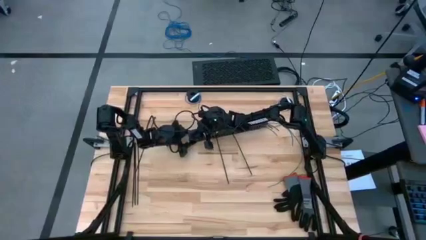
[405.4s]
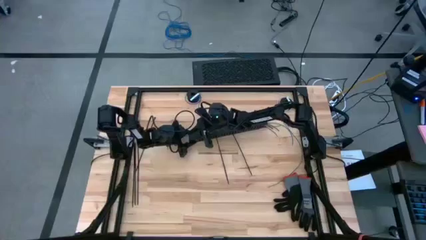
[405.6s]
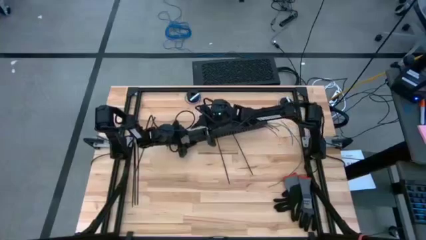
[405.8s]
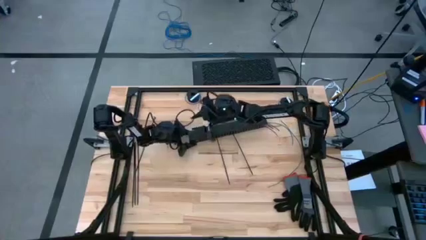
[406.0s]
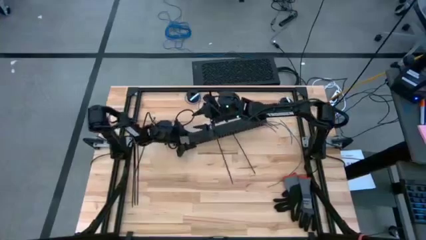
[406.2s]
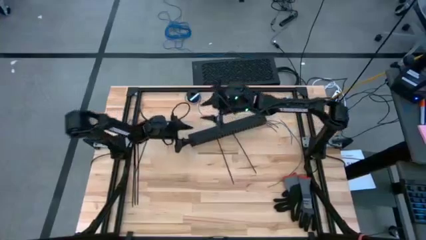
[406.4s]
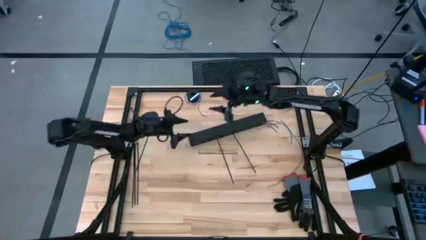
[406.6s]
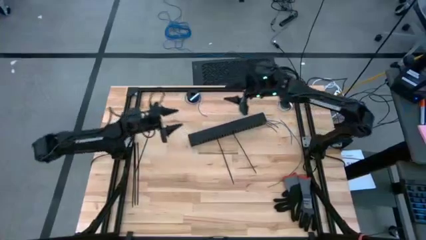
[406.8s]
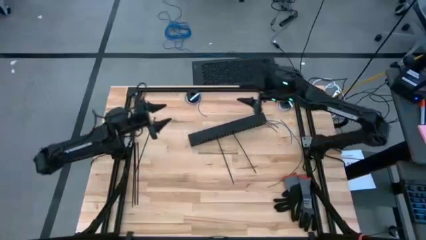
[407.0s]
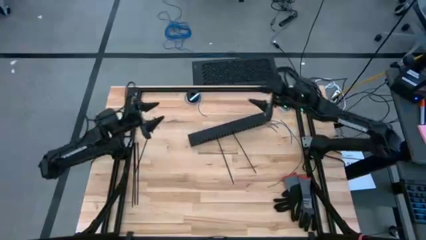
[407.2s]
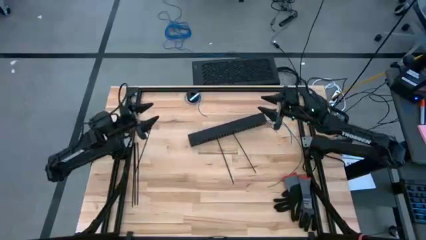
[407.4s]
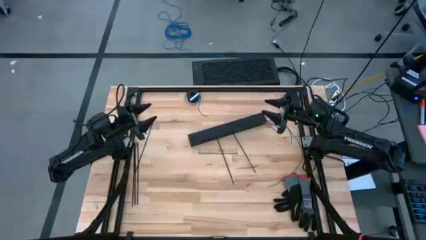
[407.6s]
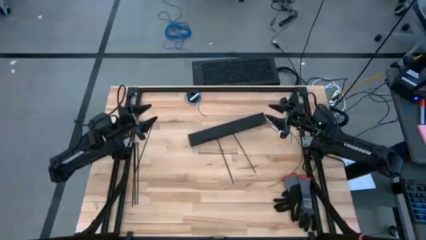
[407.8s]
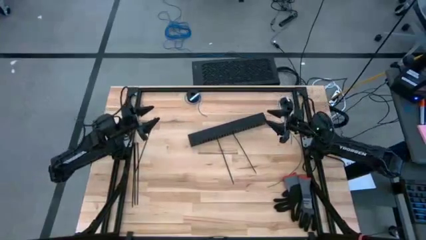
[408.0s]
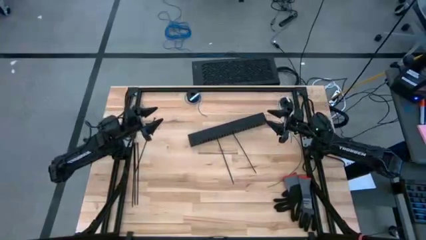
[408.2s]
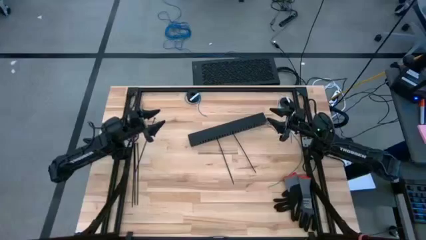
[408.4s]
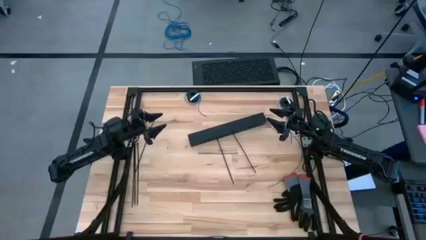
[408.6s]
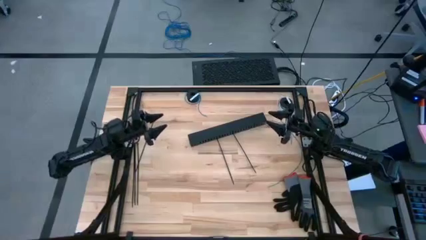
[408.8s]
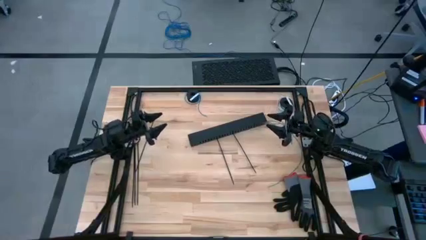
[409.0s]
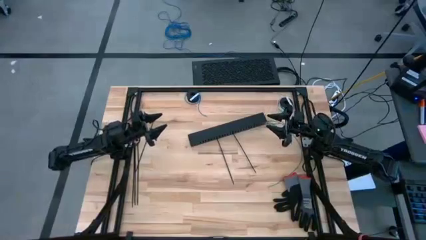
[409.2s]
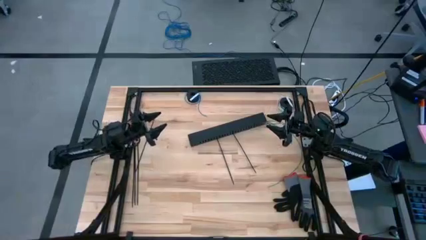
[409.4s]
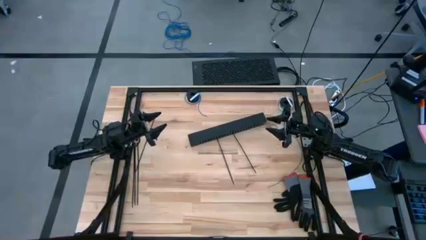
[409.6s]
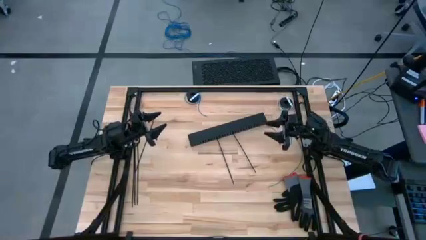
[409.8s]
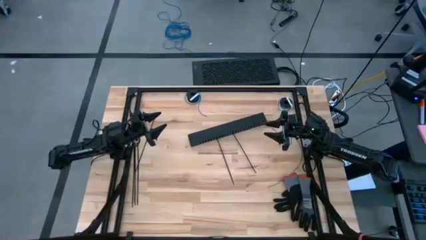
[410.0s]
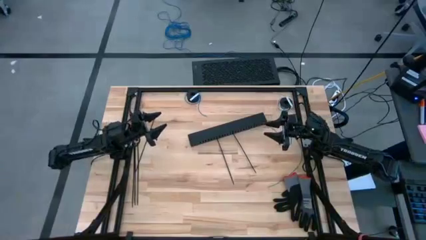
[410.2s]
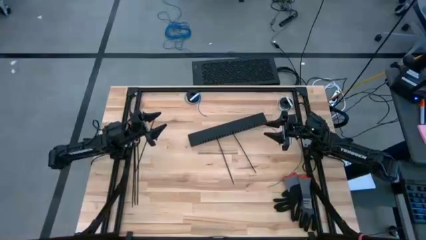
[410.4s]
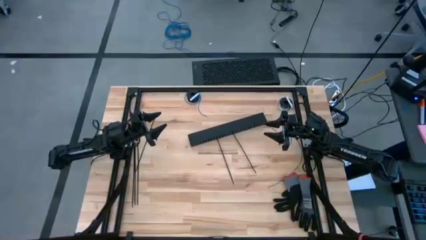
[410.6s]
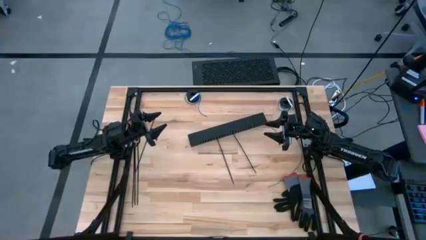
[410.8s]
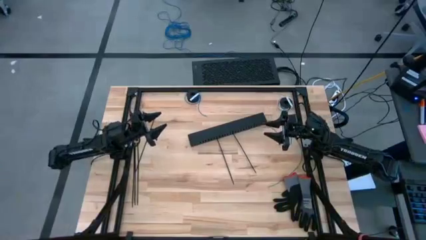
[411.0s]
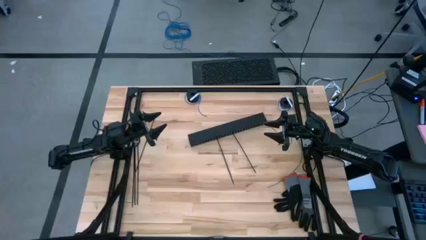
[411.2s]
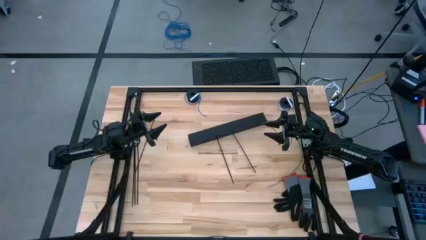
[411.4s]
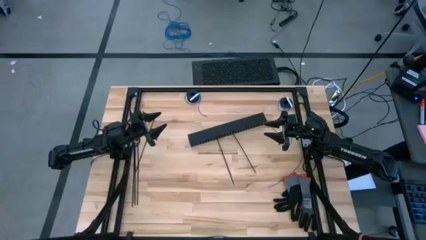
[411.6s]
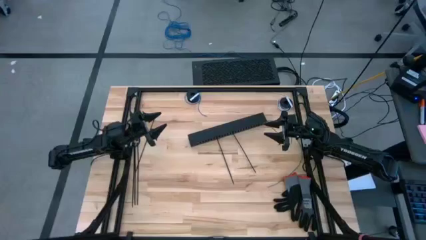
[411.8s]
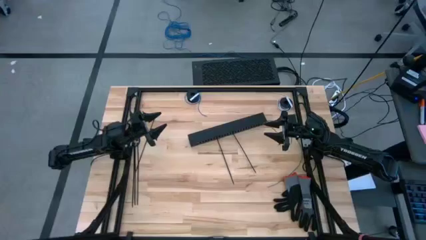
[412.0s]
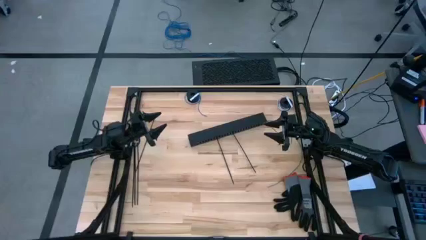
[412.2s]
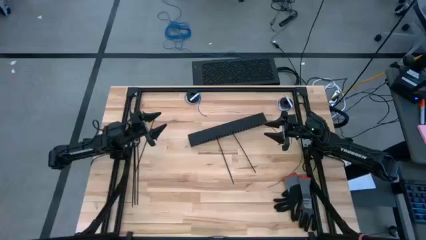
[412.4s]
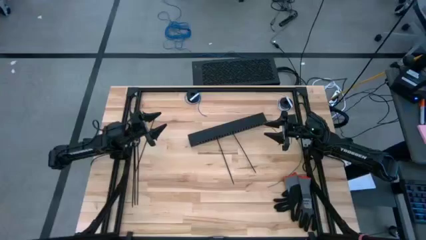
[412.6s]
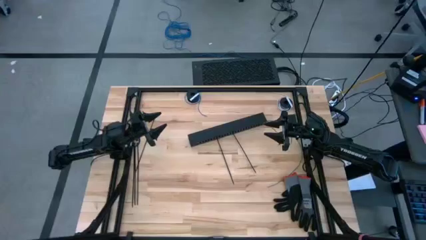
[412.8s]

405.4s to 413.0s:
Task: Ziptie cables
Return to Home Position

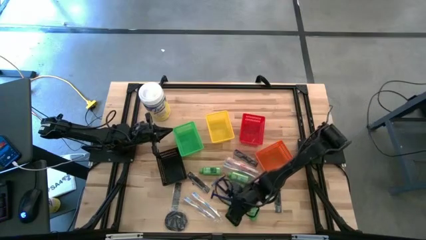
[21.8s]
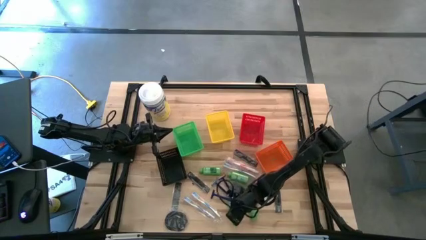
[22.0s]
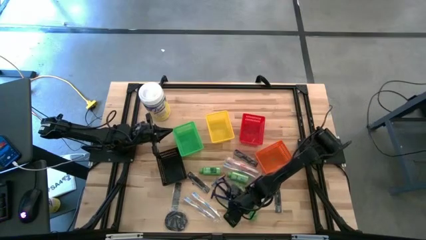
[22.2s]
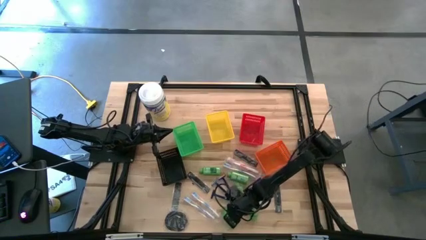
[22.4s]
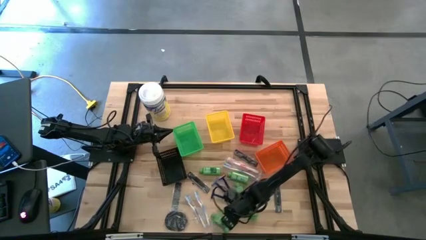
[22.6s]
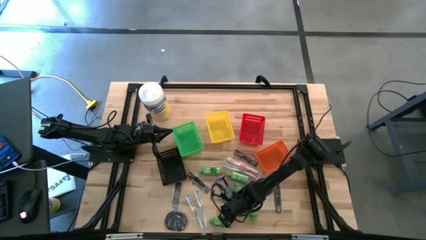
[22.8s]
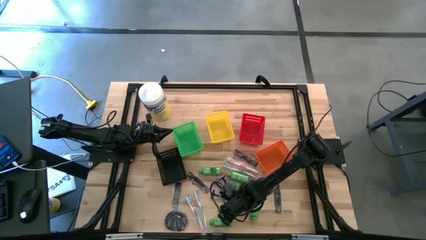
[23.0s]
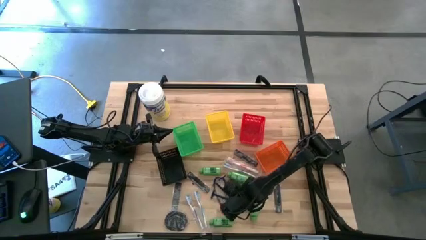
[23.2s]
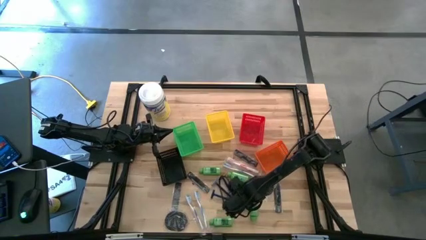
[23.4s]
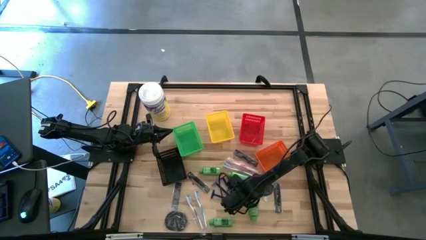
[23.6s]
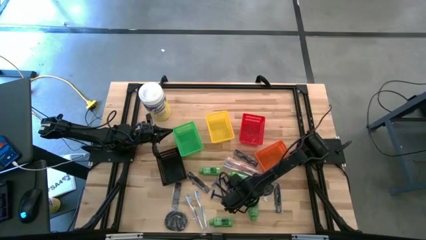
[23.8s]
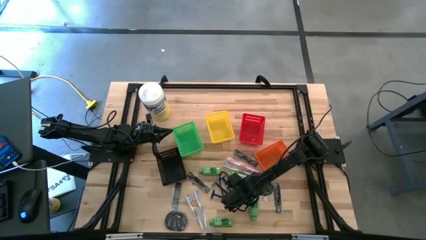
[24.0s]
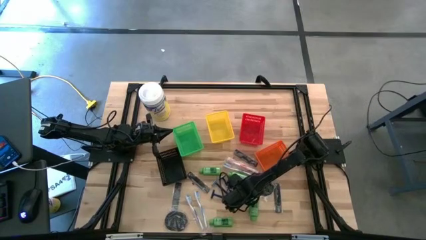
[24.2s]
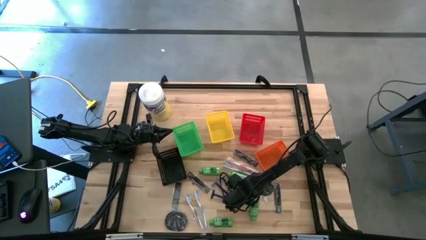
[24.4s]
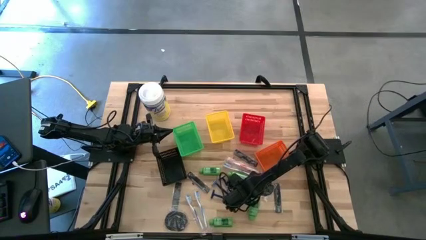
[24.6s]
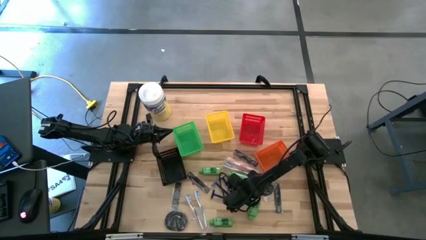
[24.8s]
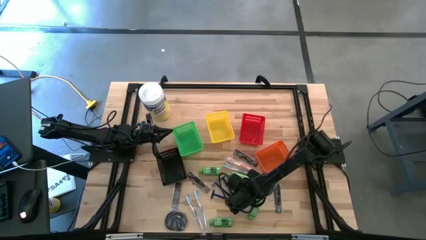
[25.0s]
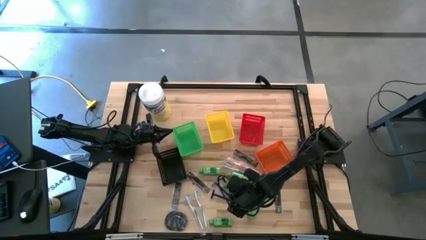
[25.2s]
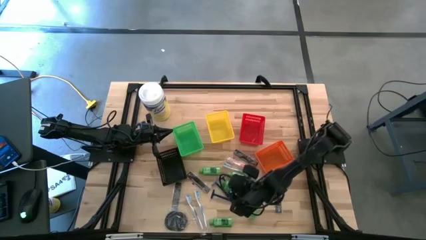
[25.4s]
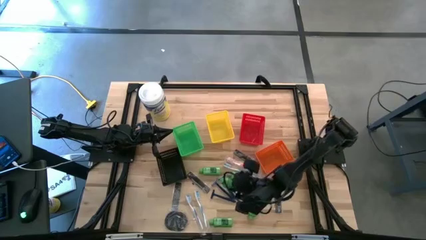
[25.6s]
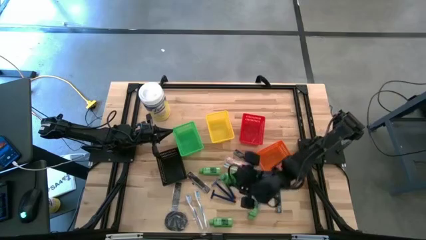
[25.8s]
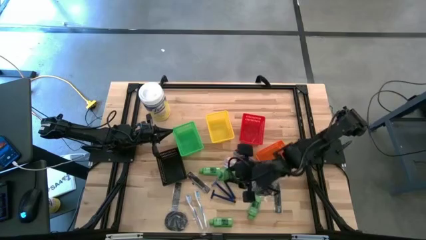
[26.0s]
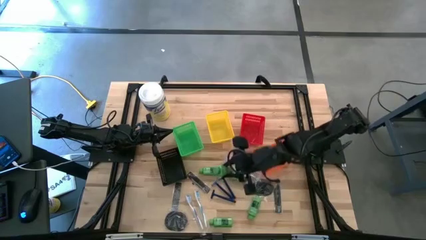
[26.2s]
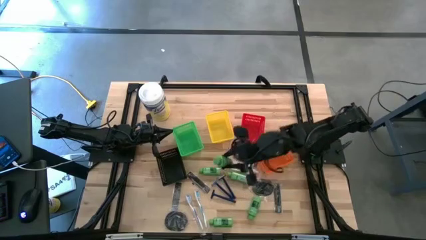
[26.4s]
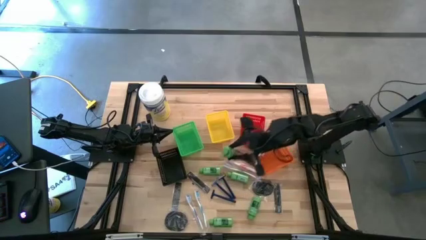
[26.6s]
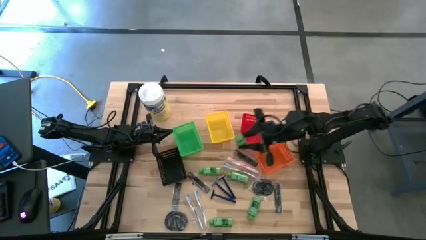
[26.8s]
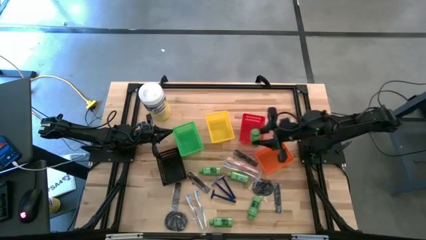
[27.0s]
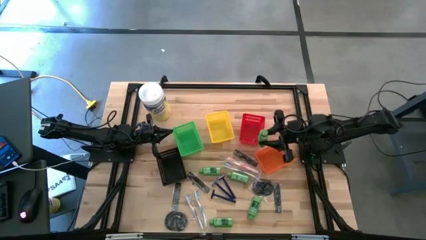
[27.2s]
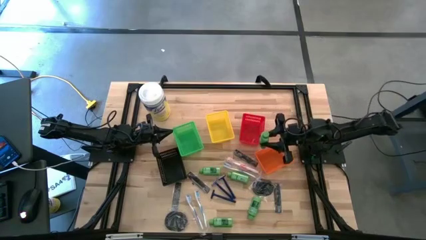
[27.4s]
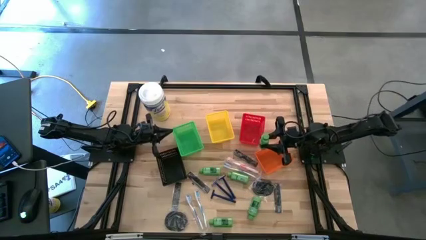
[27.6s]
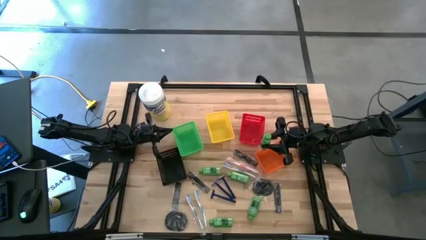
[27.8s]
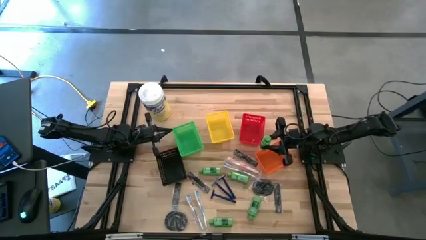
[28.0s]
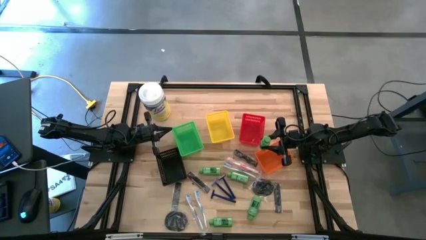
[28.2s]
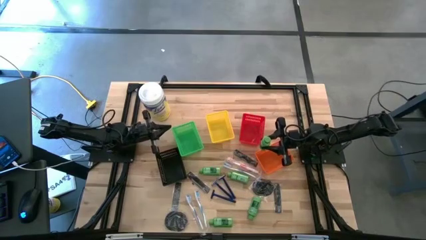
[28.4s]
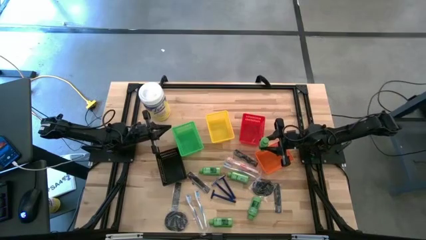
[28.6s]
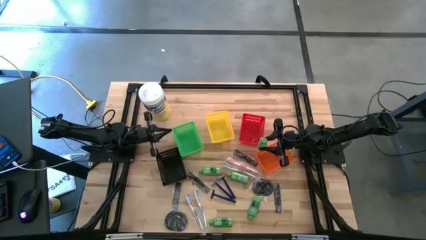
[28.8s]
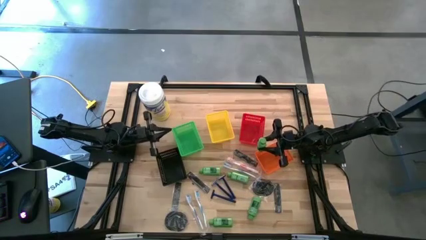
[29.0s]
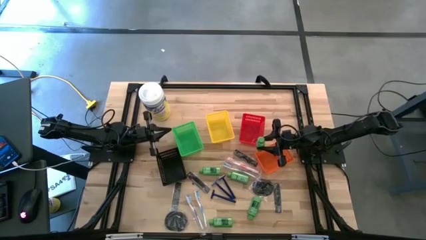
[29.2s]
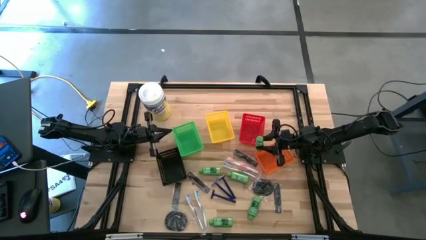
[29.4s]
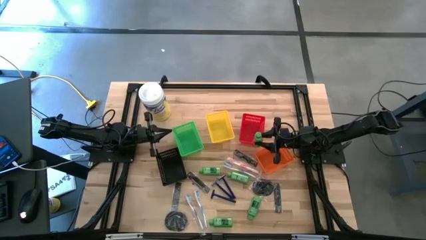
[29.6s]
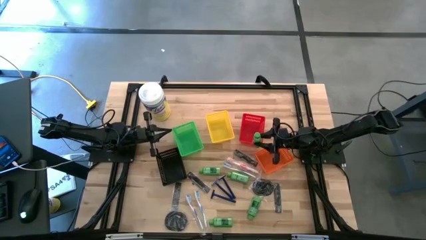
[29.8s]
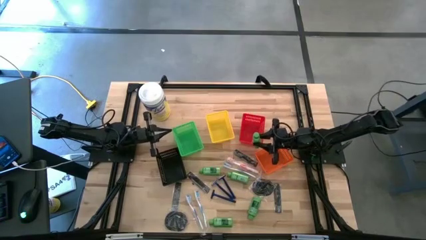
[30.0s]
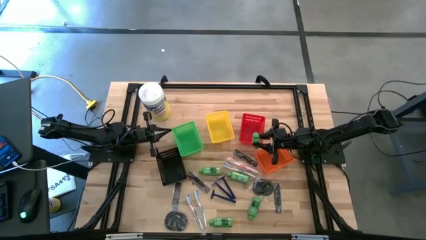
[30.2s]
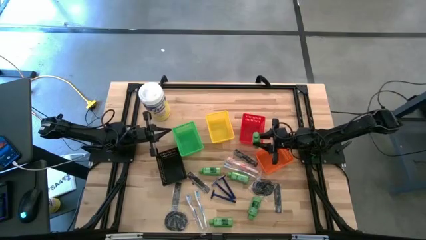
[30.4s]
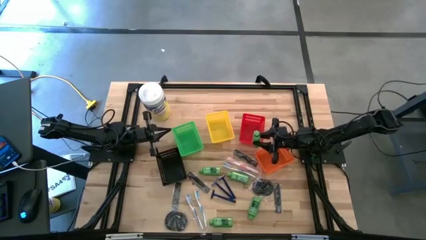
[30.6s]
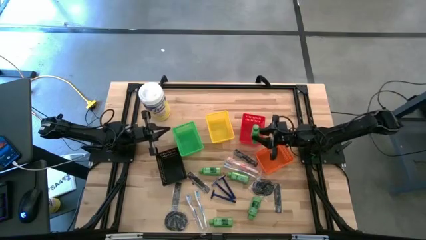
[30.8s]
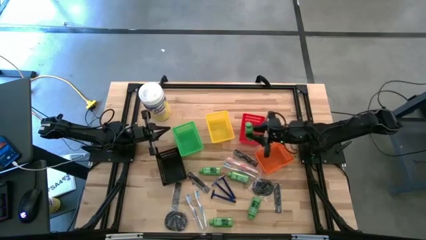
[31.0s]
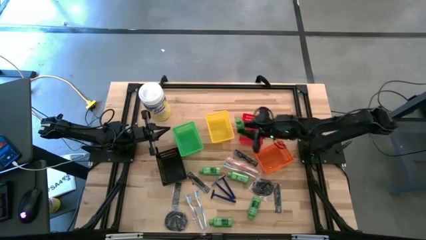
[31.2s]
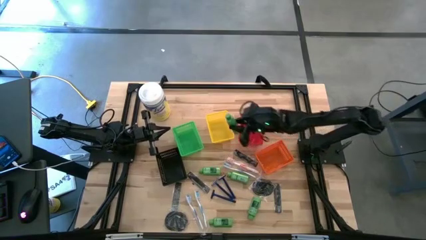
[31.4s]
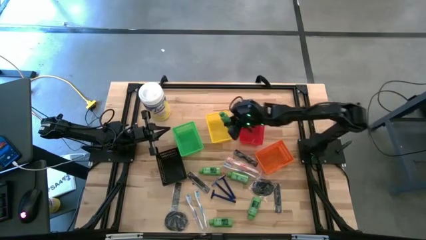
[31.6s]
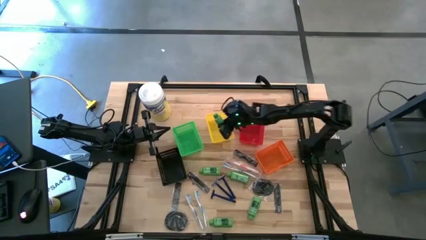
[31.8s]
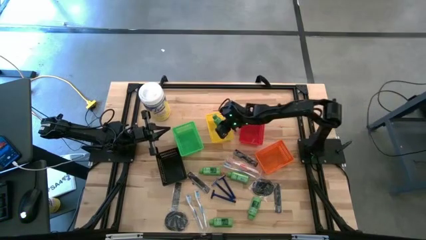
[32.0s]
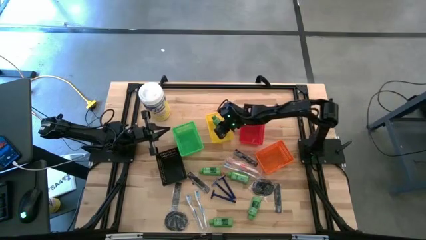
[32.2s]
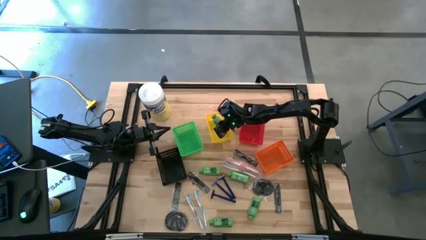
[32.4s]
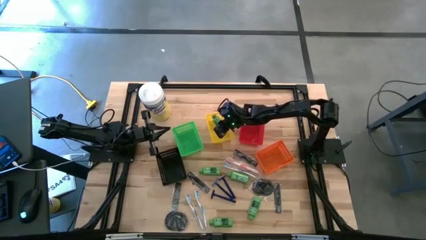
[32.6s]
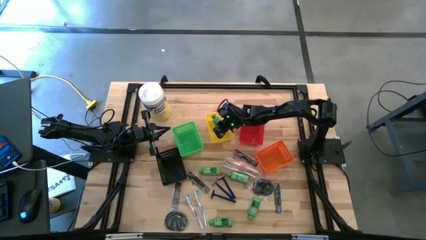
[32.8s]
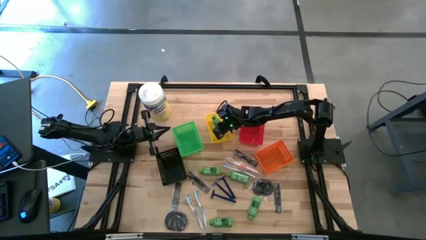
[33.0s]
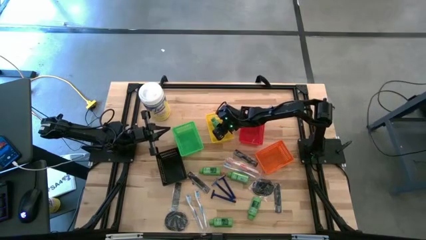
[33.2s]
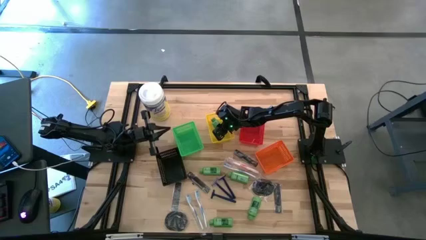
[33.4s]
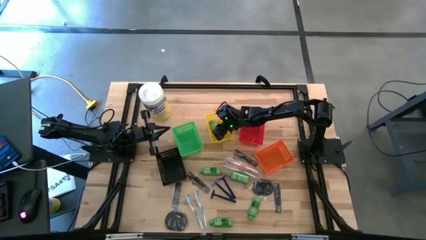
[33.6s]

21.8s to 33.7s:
Task: Pick & Place Travel size toiletries
Put the green shampoo into the yellow bin
